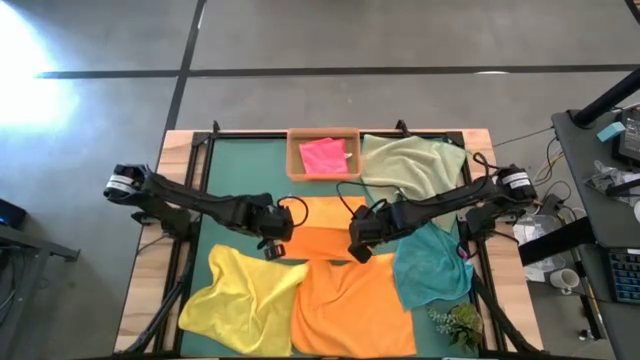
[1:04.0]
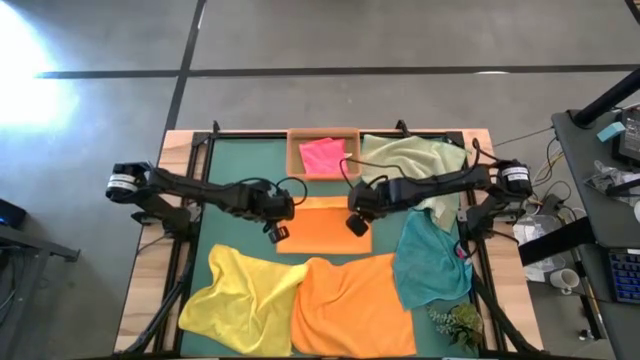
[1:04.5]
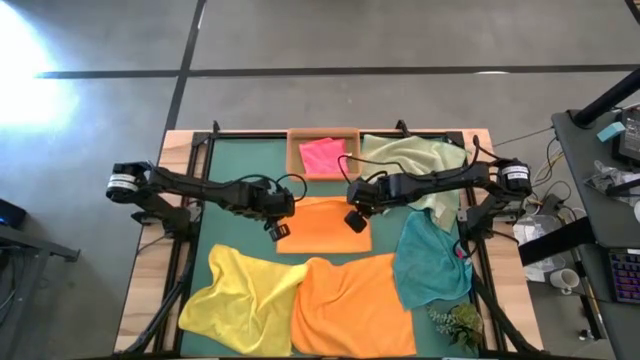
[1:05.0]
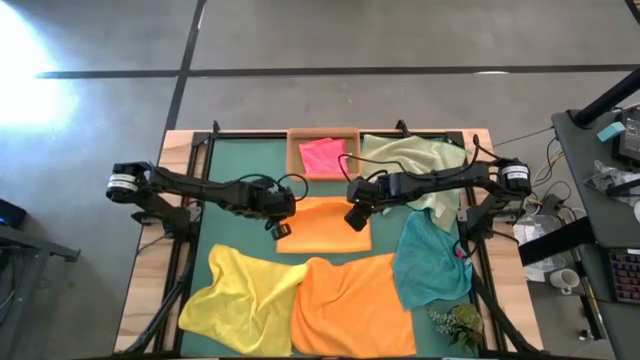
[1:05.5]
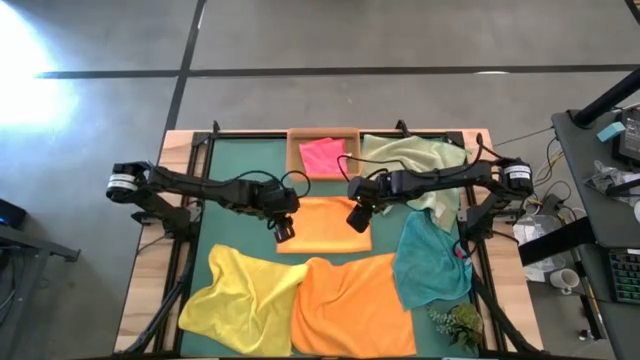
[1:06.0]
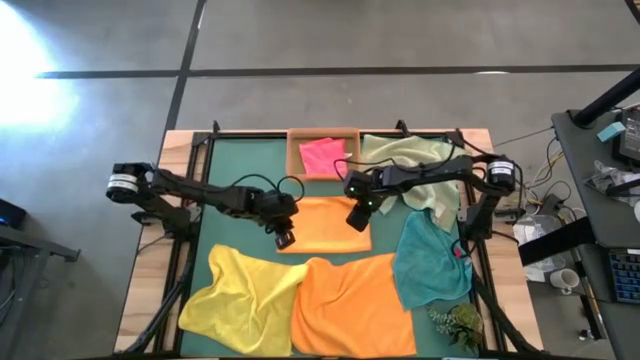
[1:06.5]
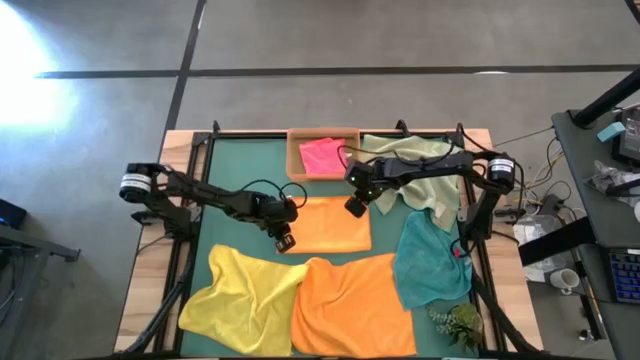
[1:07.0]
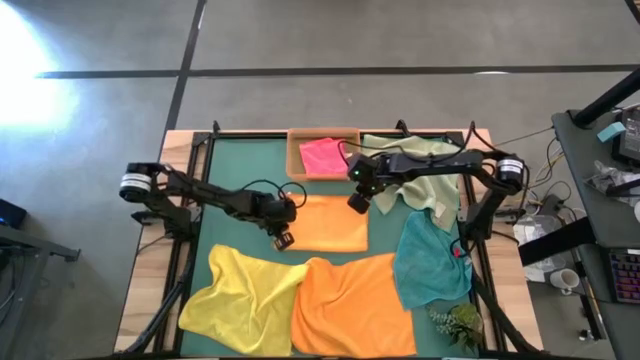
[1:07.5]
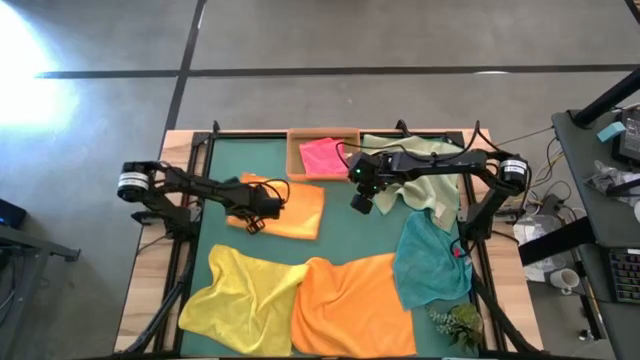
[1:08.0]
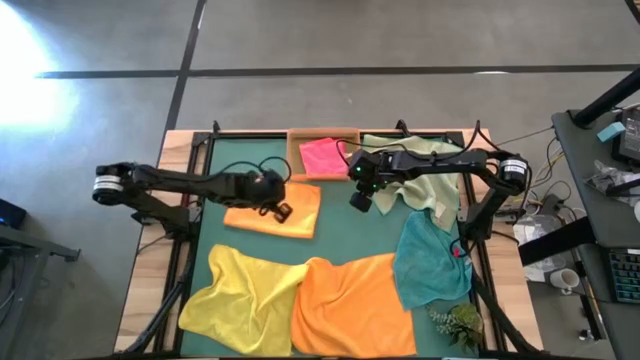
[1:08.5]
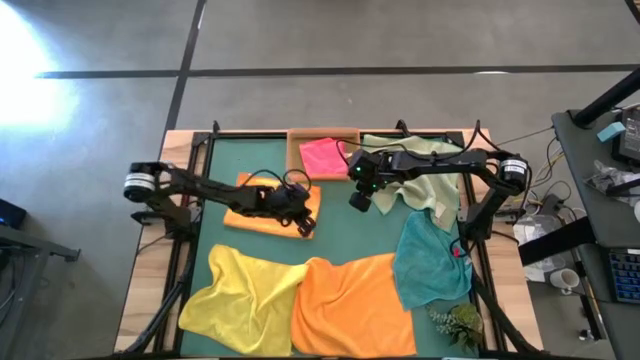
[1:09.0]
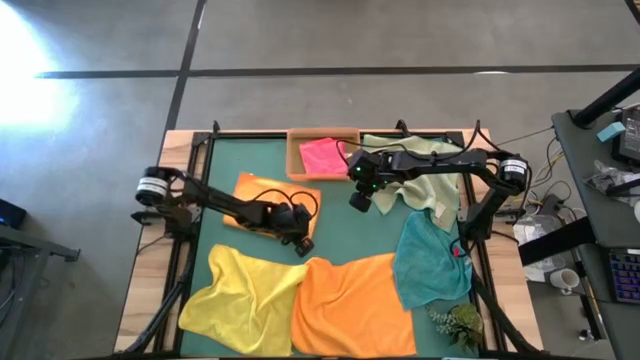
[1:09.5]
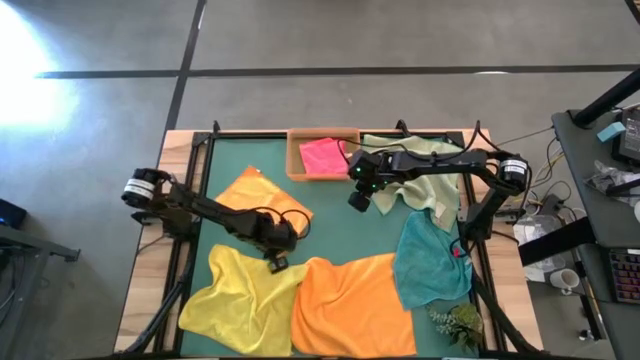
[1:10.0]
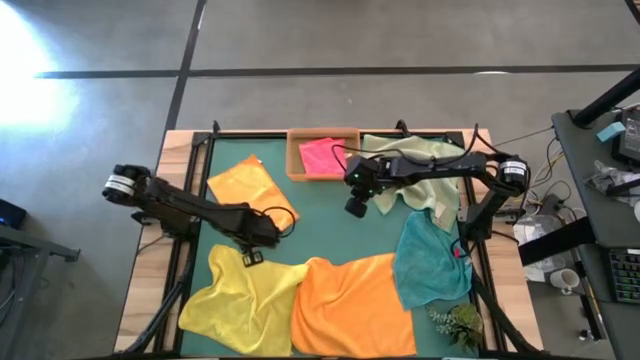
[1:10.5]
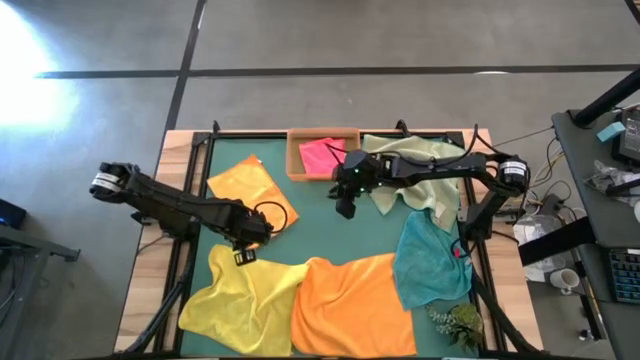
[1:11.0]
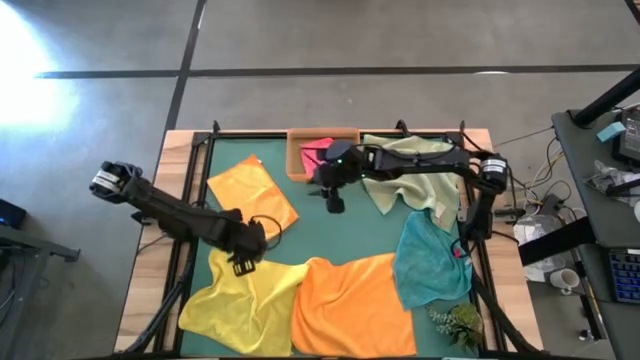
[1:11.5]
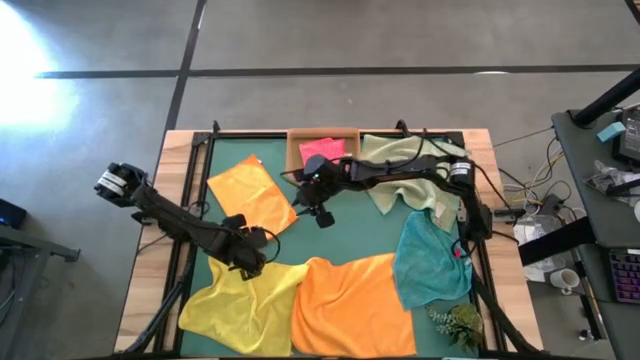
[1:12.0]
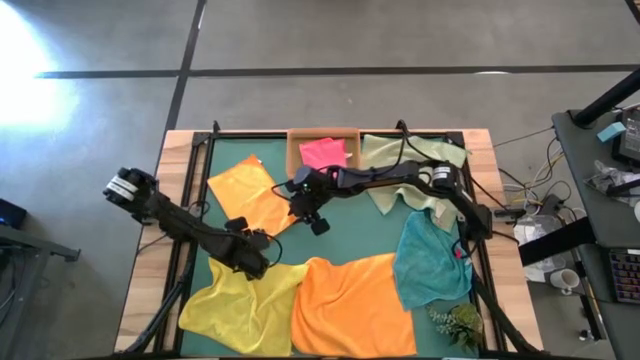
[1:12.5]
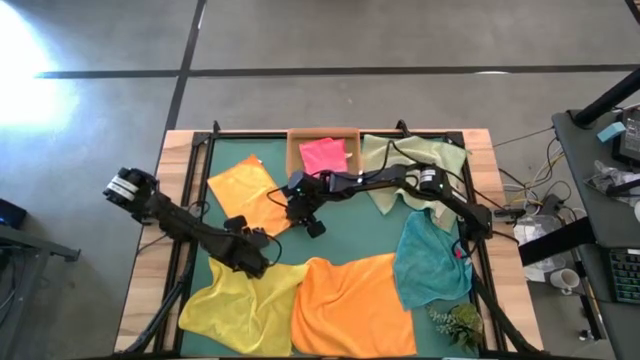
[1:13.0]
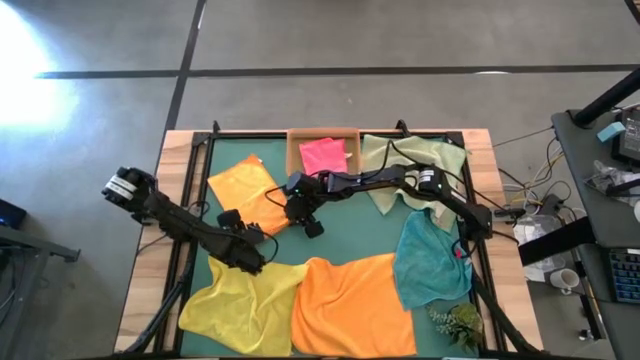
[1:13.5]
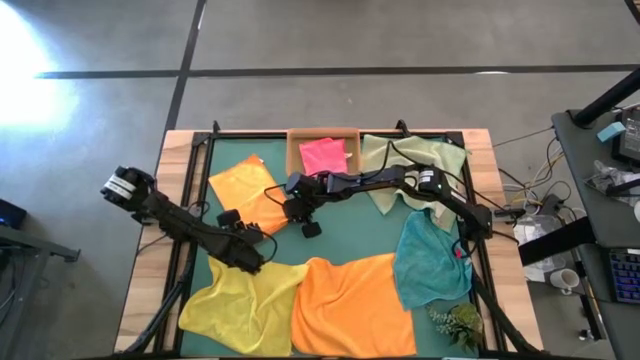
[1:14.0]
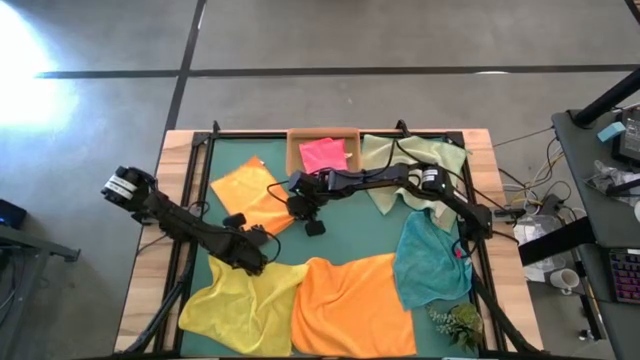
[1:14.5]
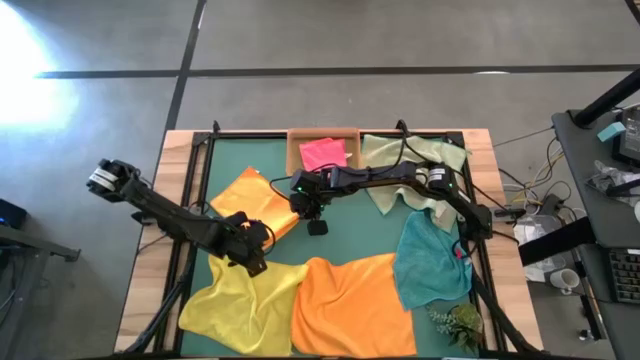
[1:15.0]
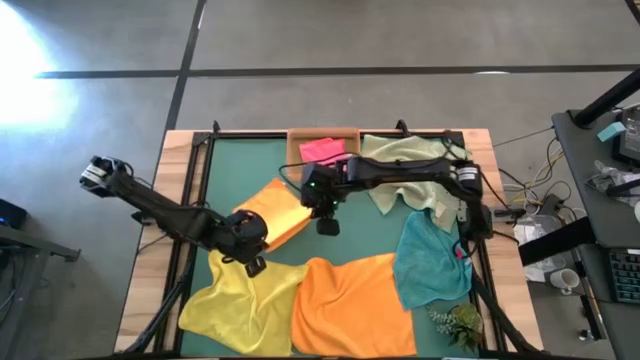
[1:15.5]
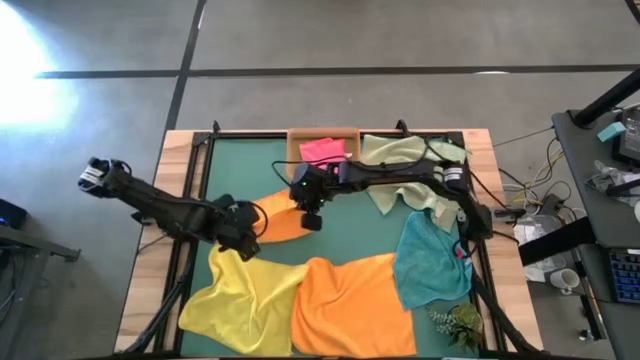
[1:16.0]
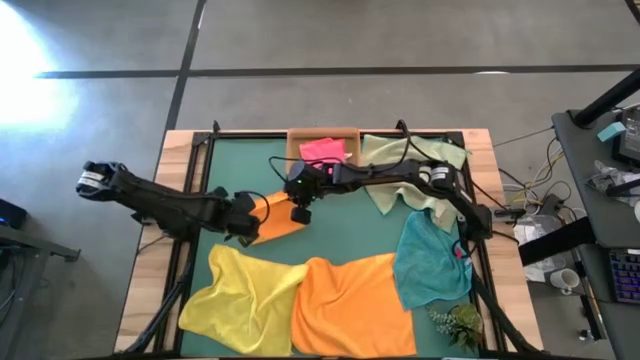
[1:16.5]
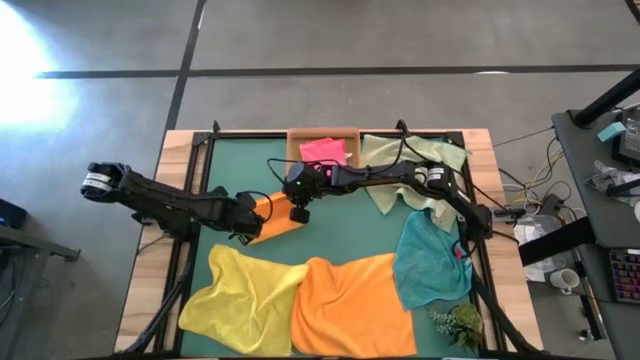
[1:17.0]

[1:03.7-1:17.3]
Task: Fold microfiber towels
Fold the top orange towel

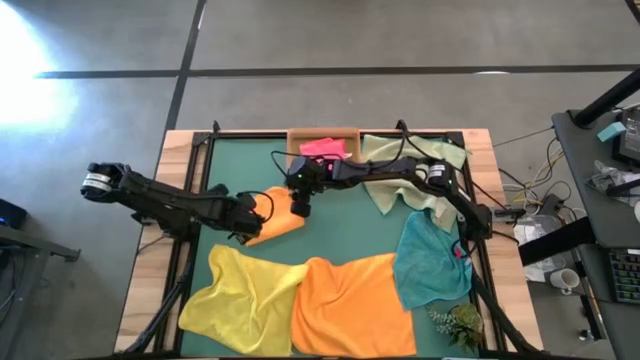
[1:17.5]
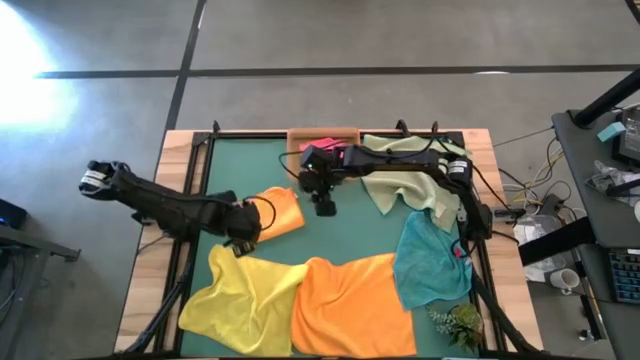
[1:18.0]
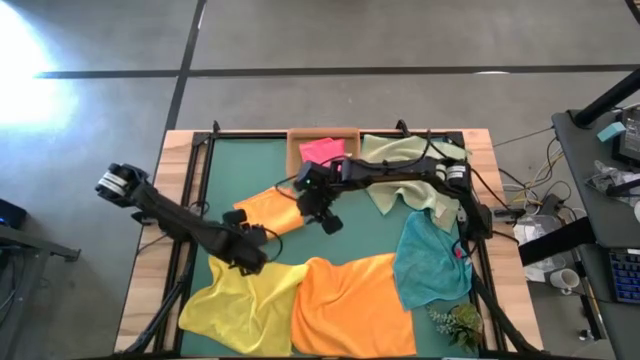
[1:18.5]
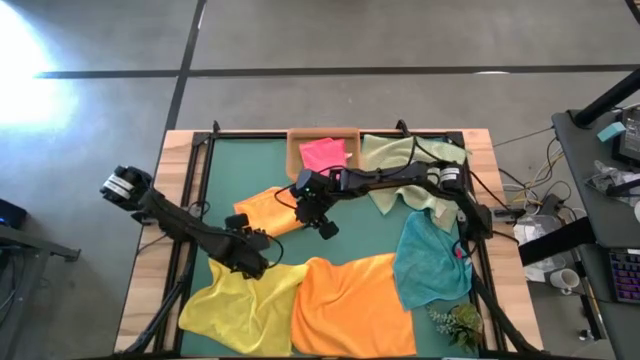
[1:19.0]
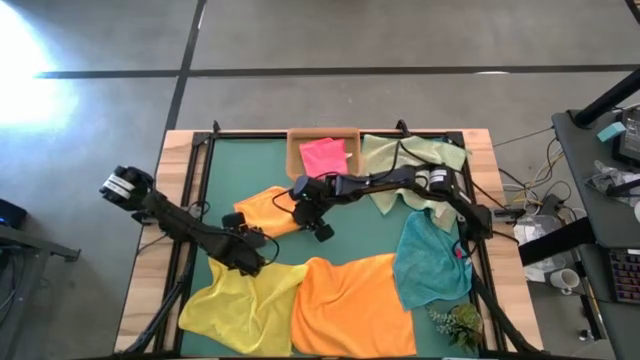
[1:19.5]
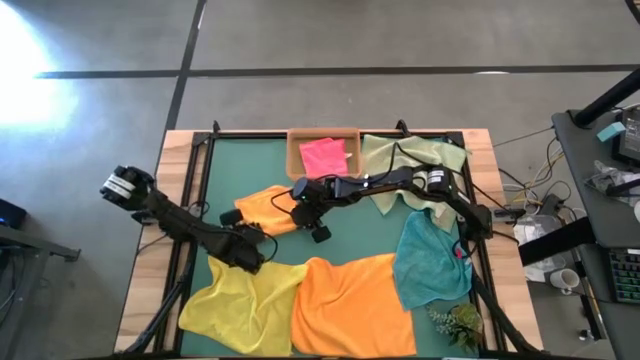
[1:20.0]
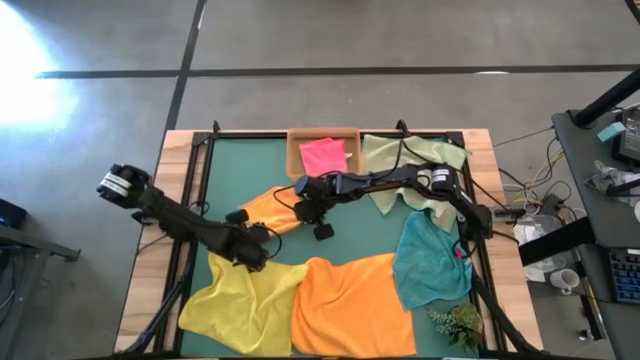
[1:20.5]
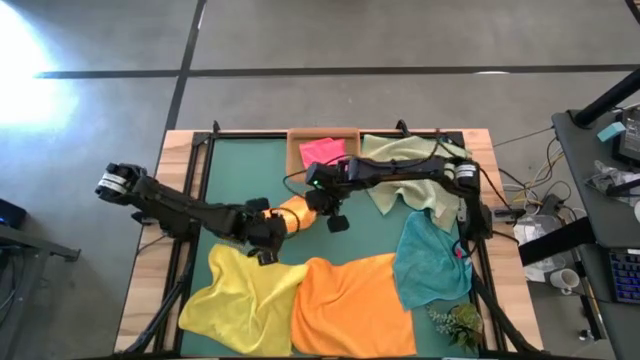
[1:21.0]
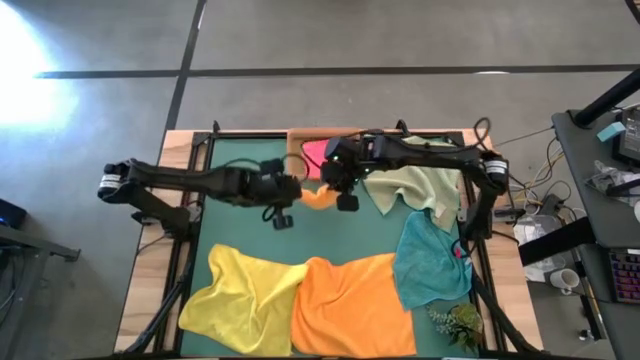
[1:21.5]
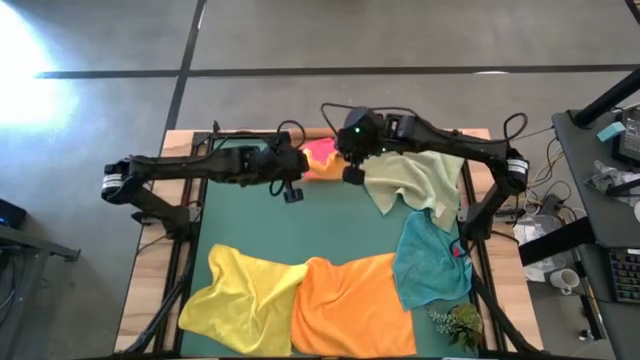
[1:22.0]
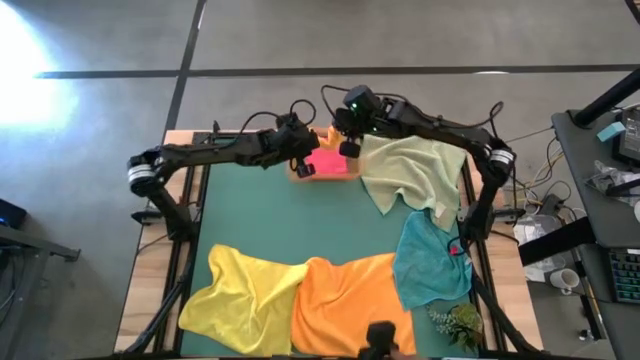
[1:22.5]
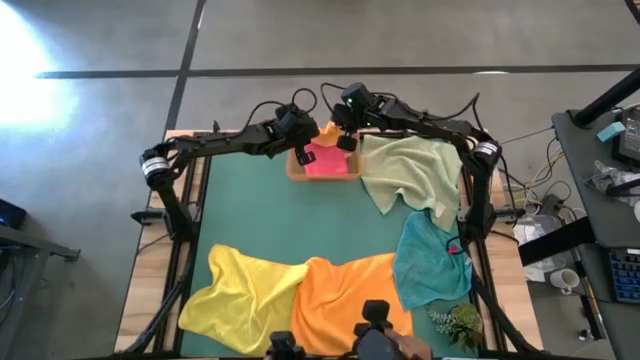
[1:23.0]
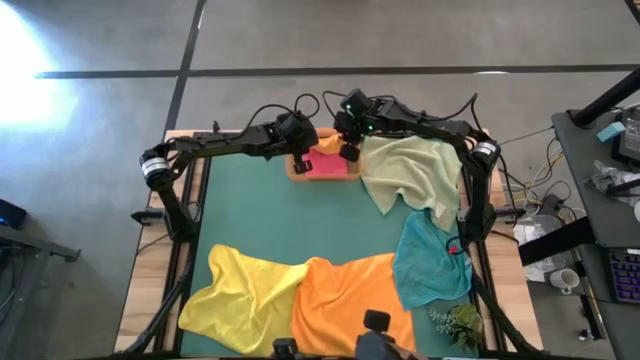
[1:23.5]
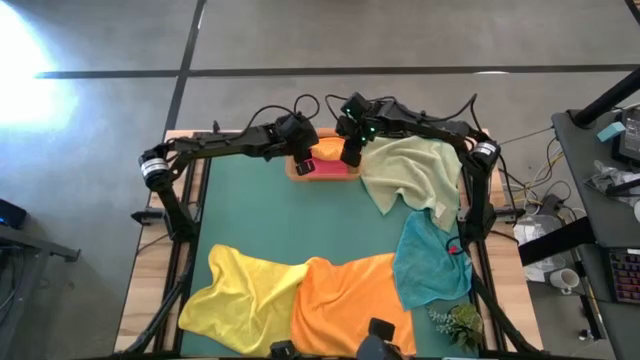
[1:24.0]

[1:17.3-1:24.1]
Put the orange towel into the orange bin
